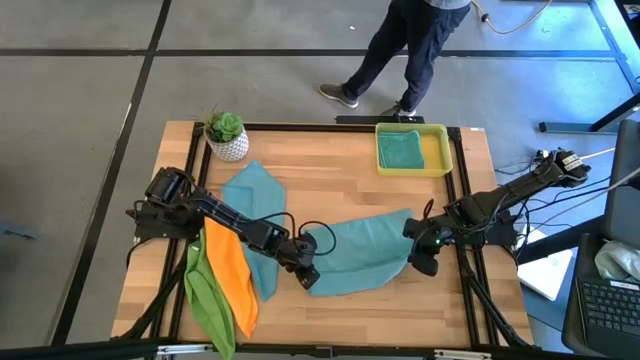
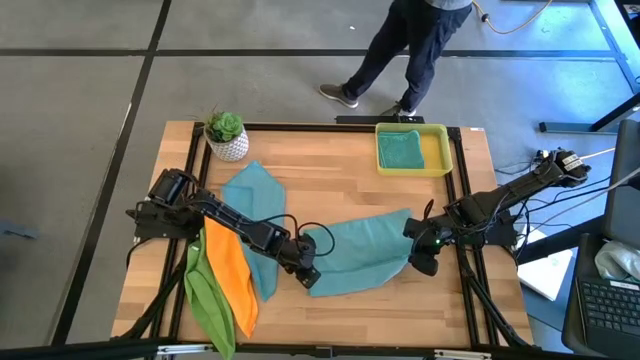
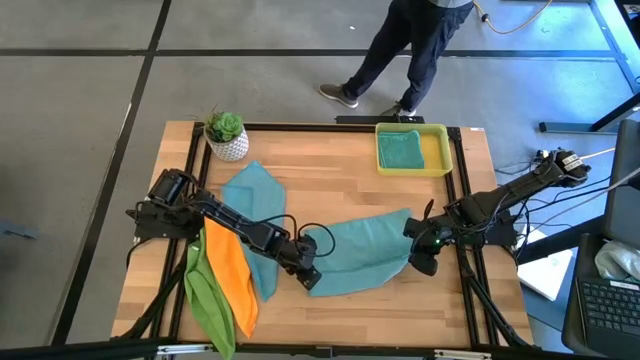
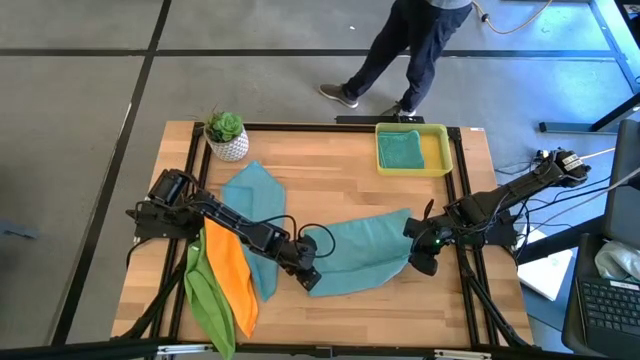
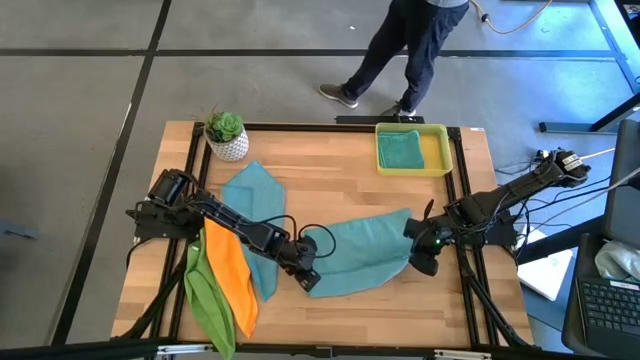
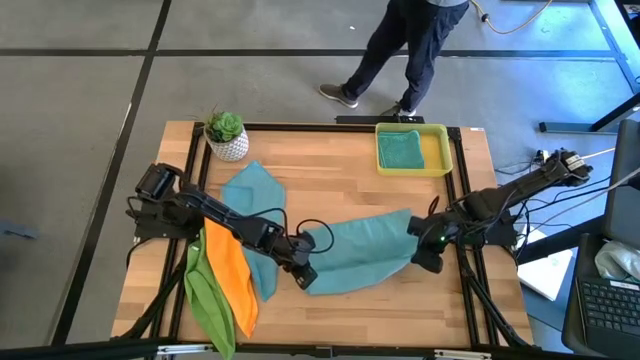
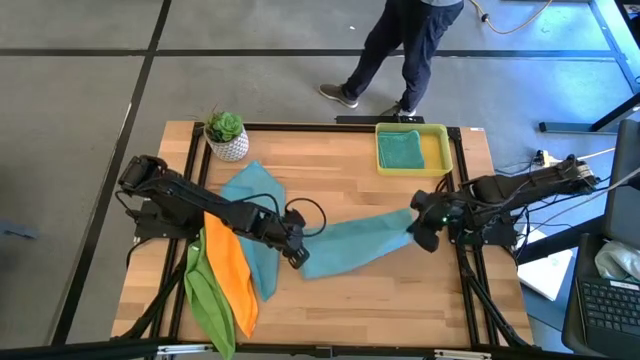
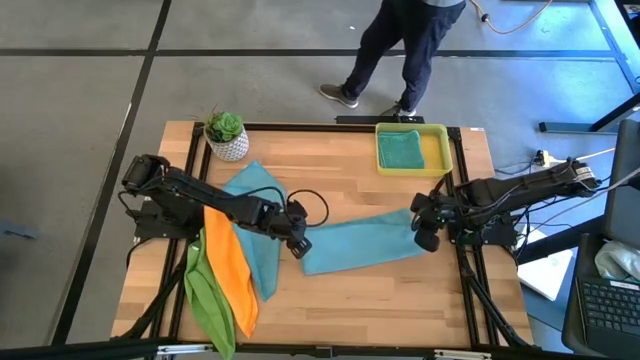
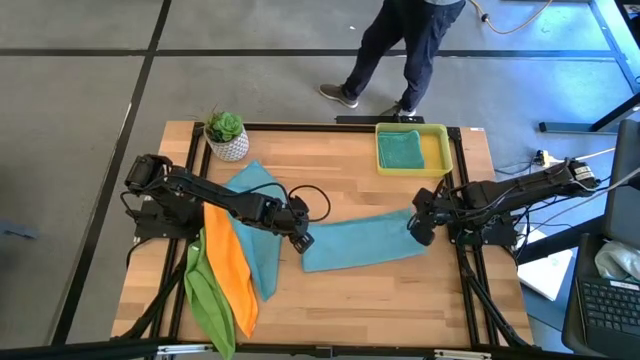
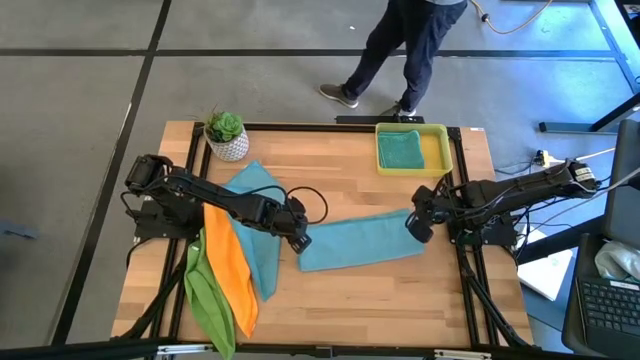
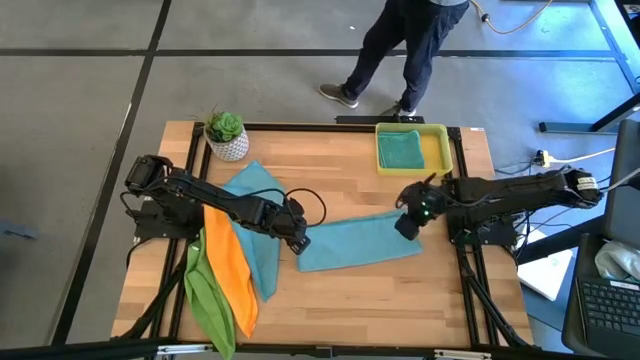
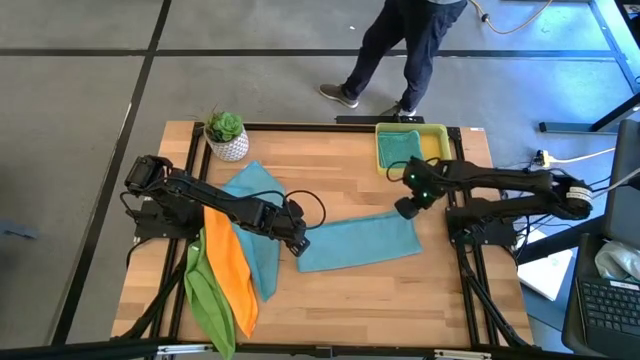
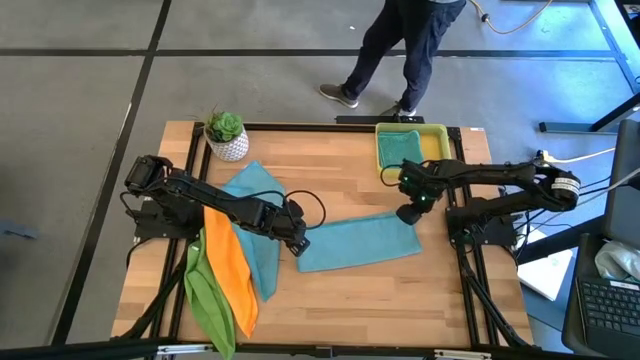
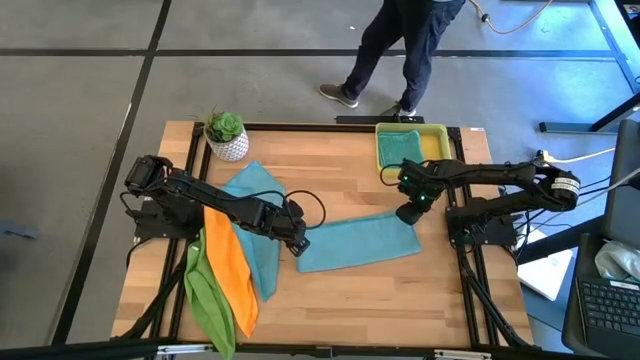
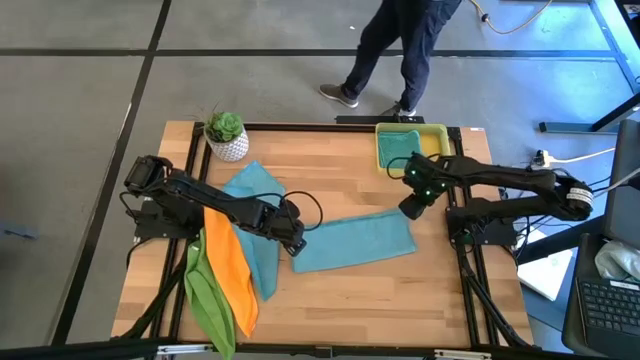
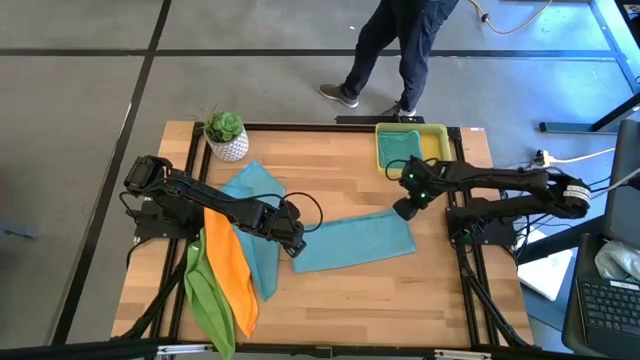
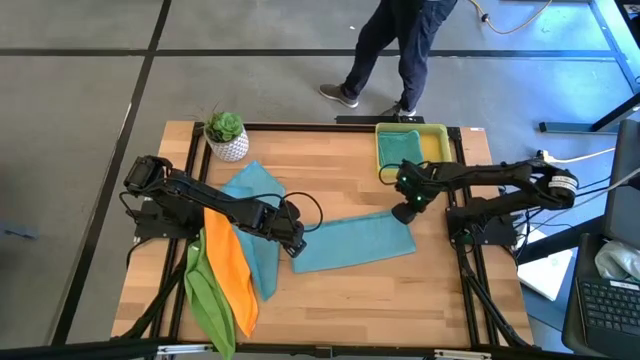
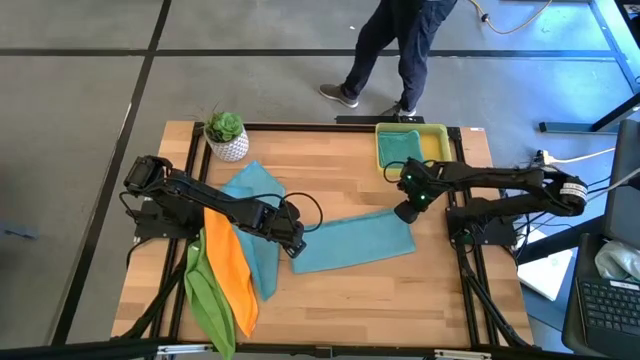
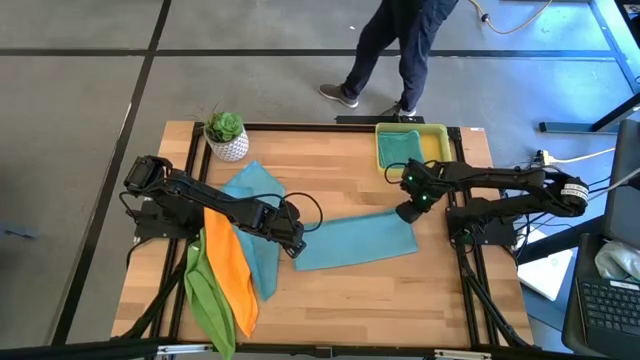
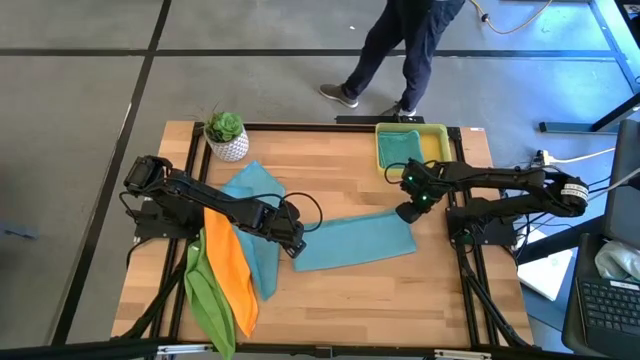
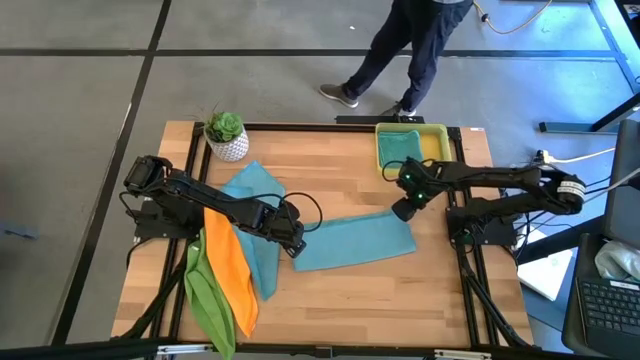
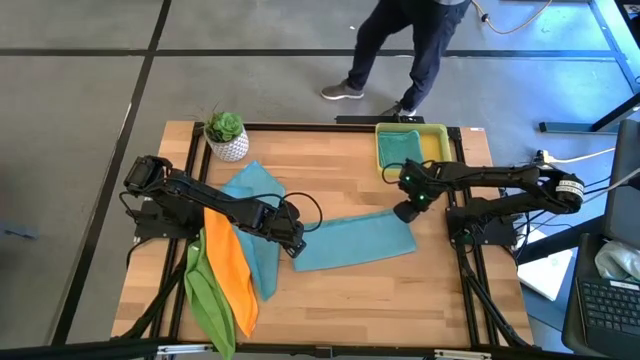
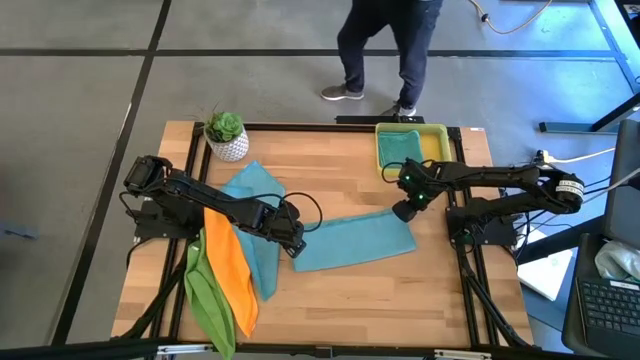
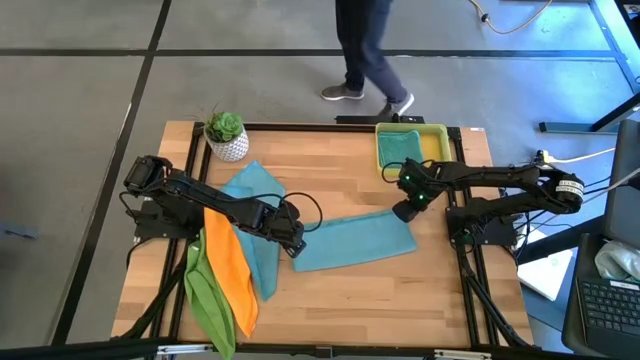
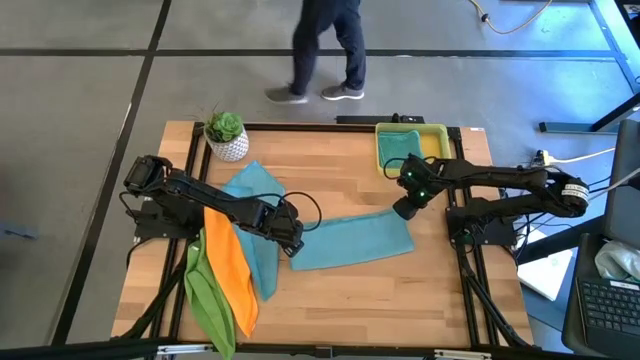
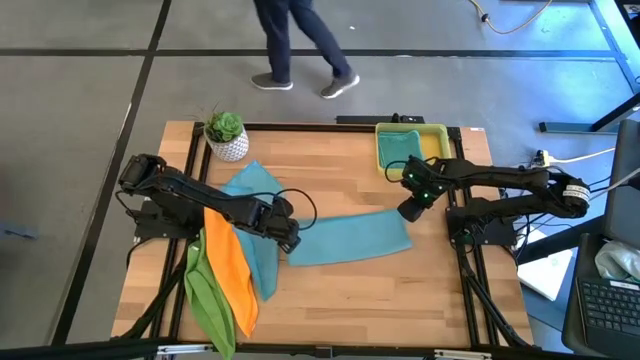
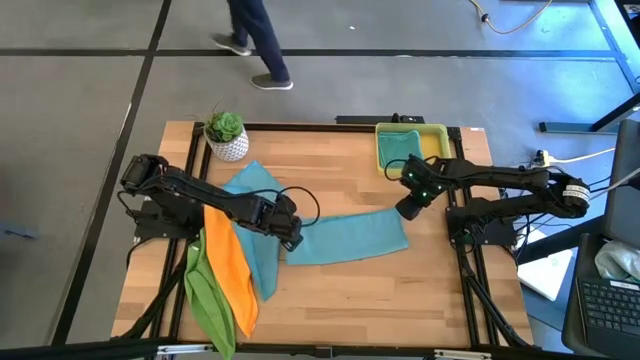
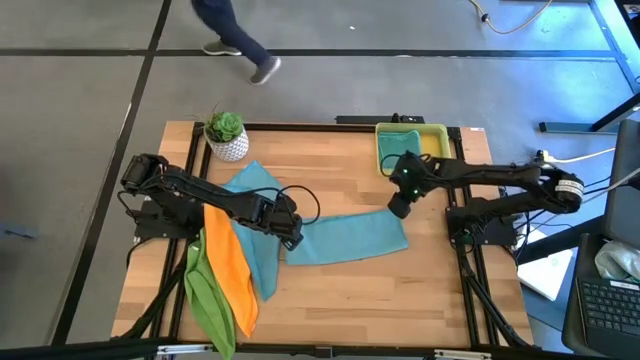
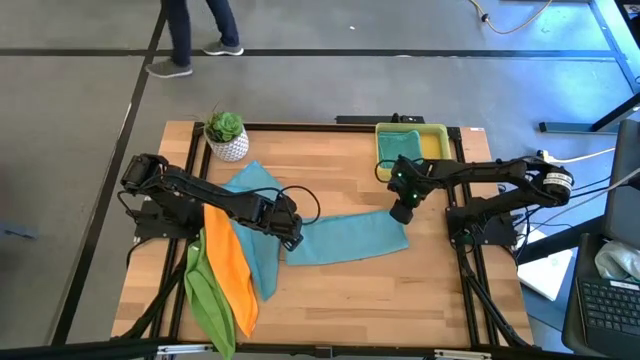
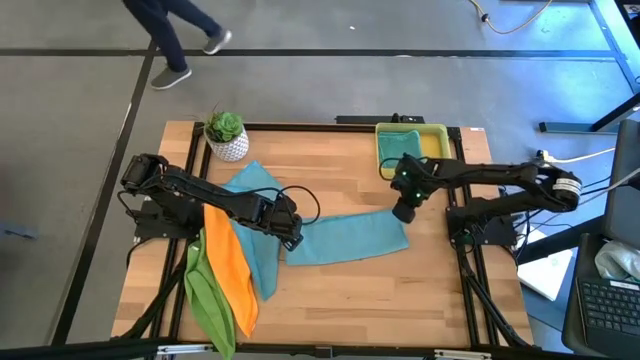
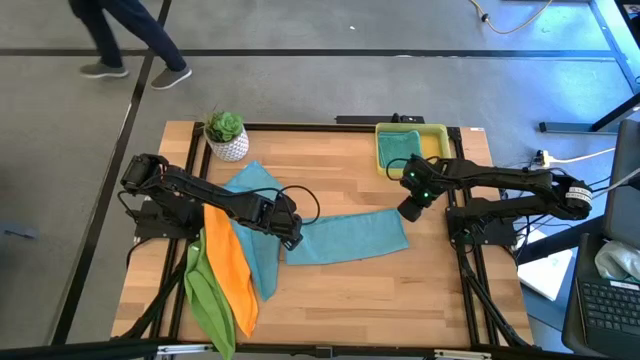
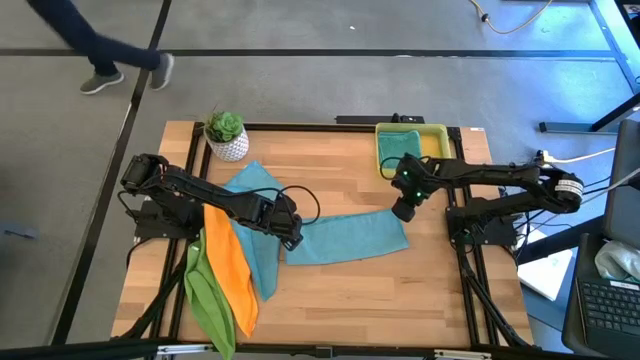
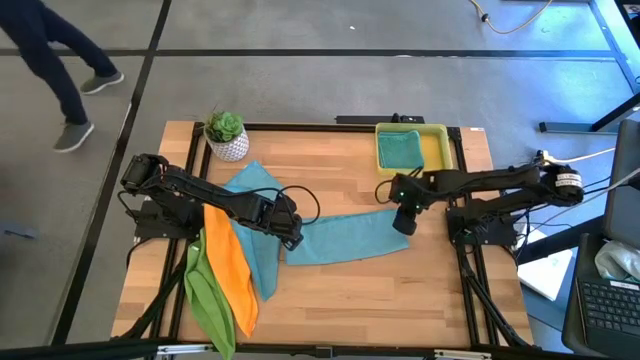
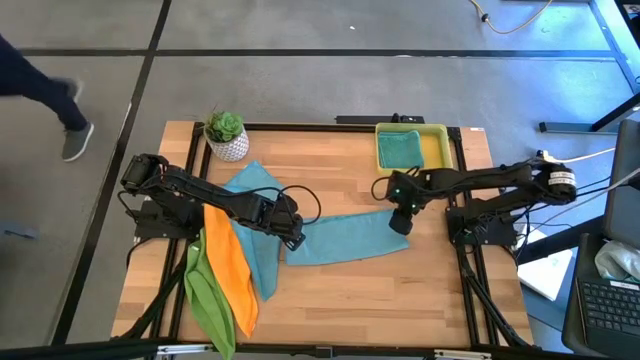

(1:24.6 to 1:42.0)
Task: Fold microfiber towels
Fold the right blue microfiber towel

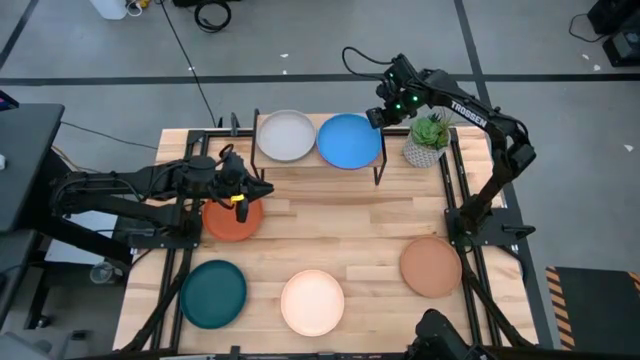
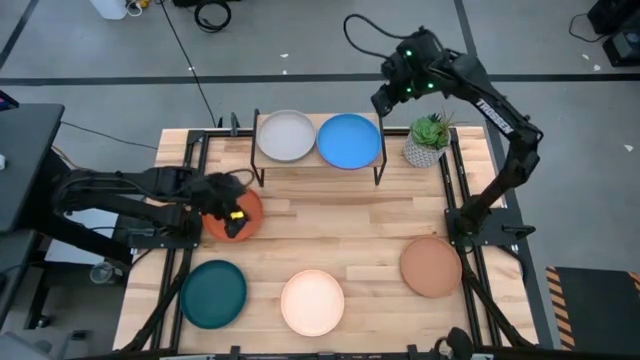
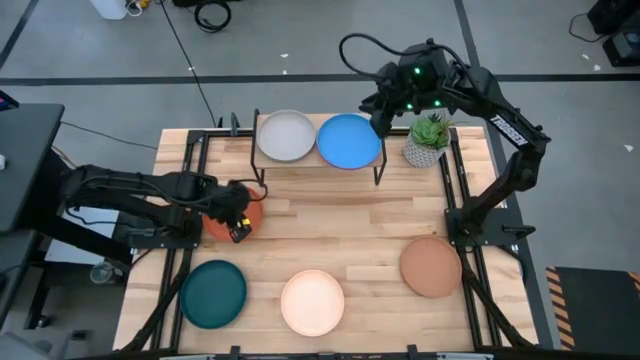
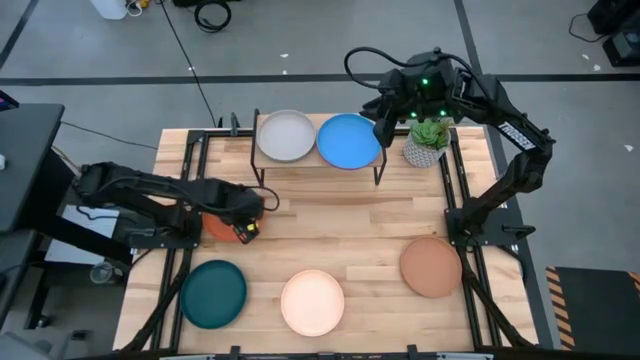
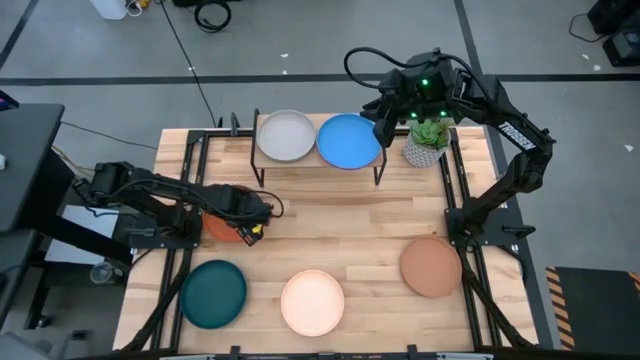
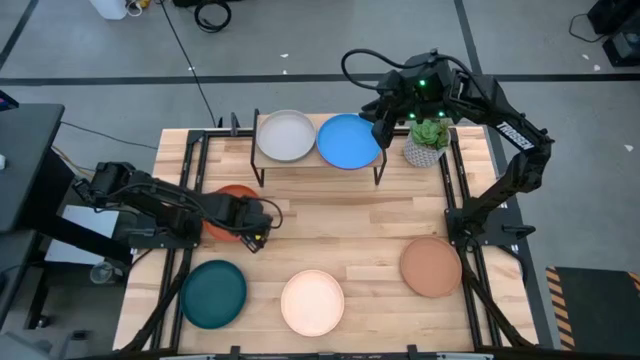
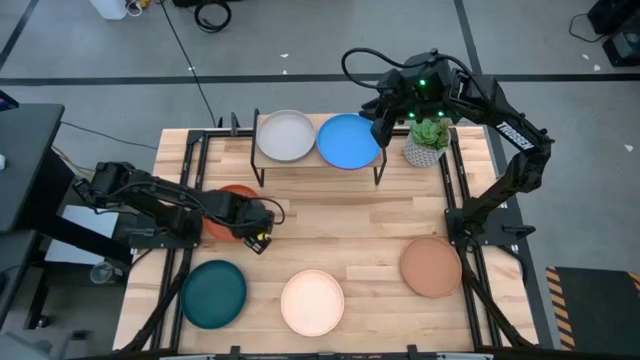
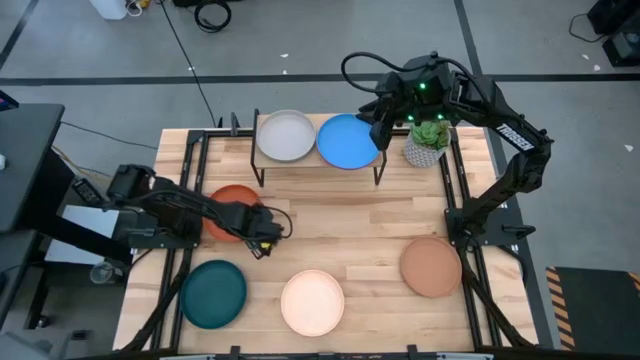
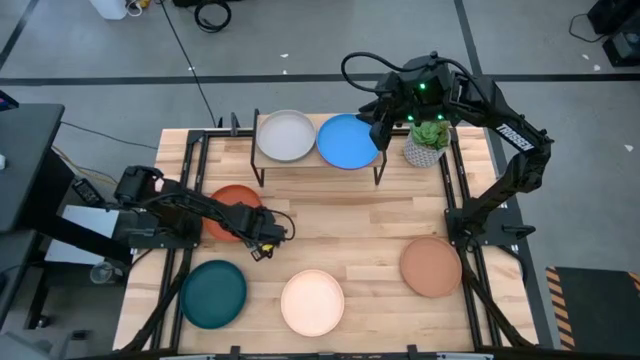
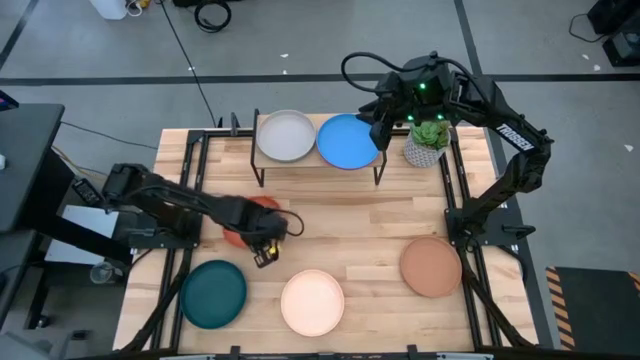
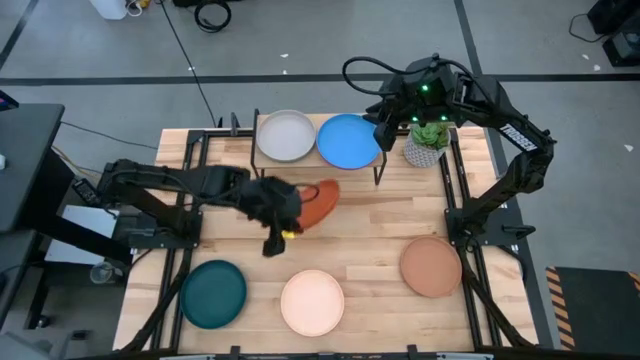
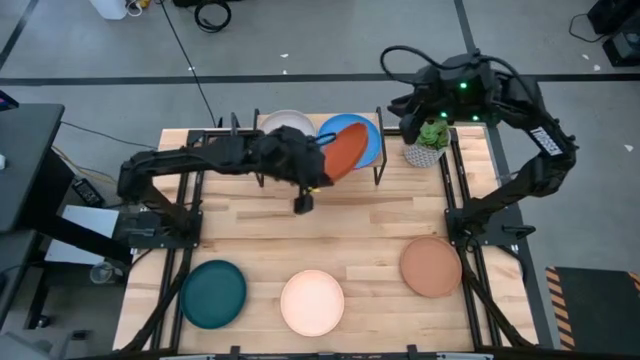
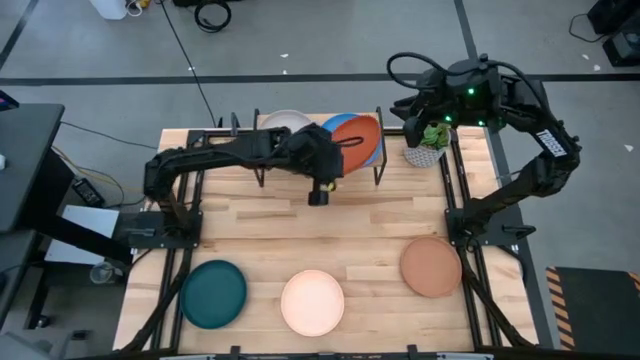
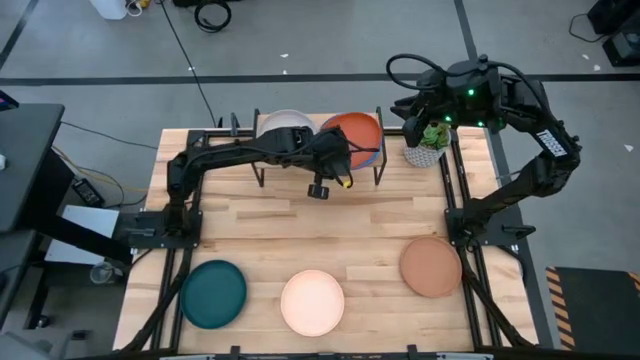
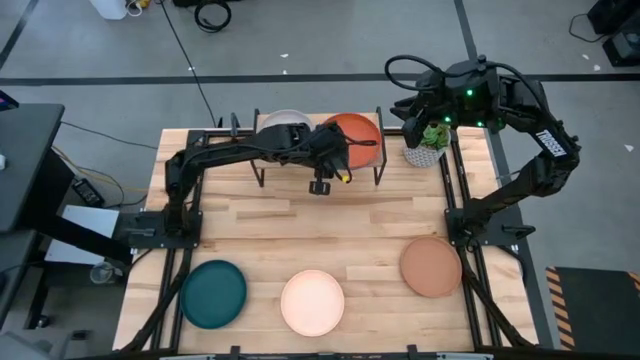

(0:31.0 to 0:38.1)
Task: Place and stack plates onto a shelf
Stack the orange plate on top of the blue plate on the shelf
